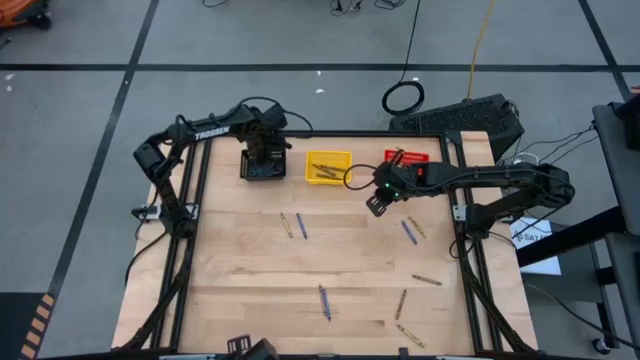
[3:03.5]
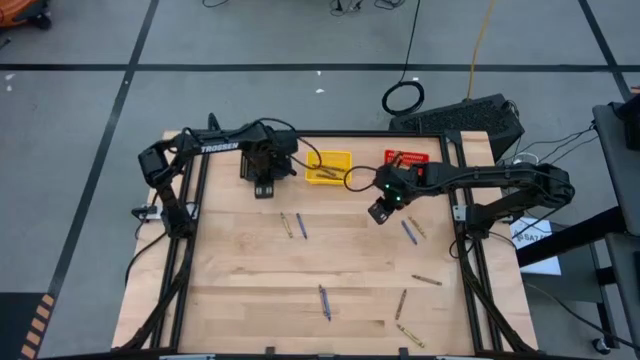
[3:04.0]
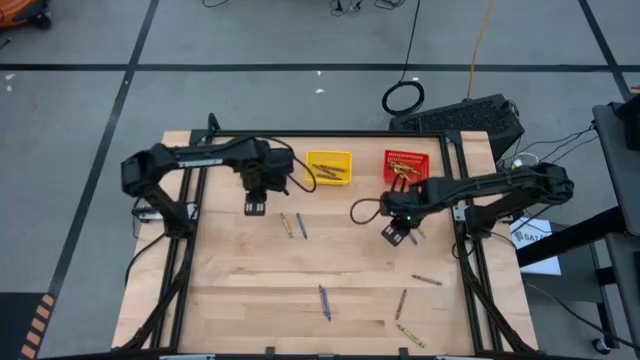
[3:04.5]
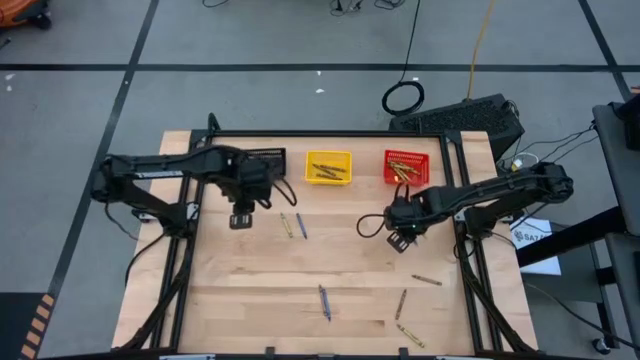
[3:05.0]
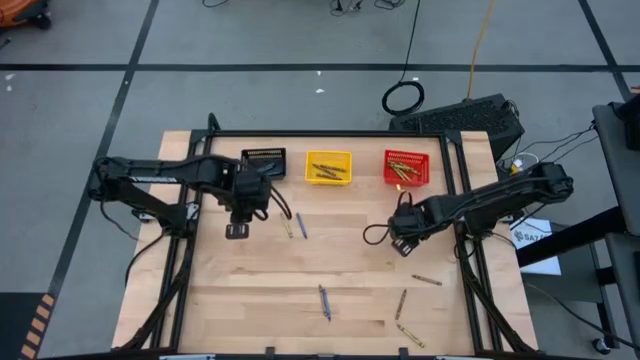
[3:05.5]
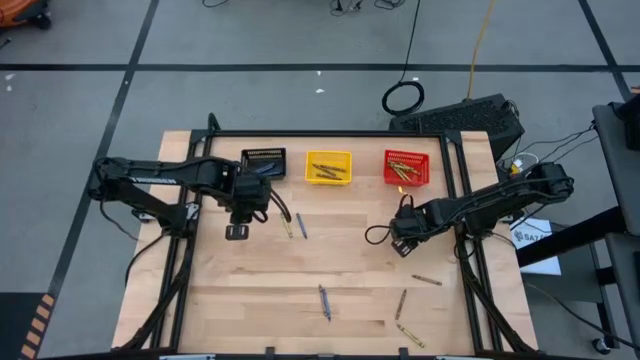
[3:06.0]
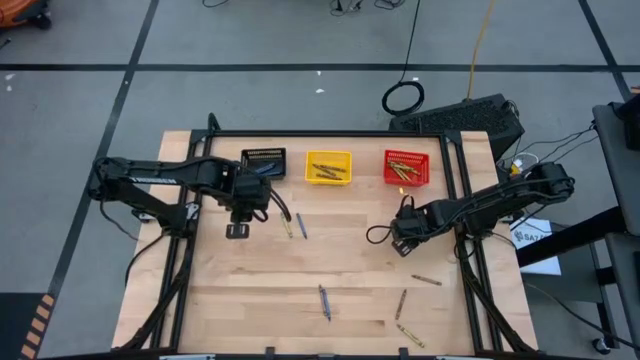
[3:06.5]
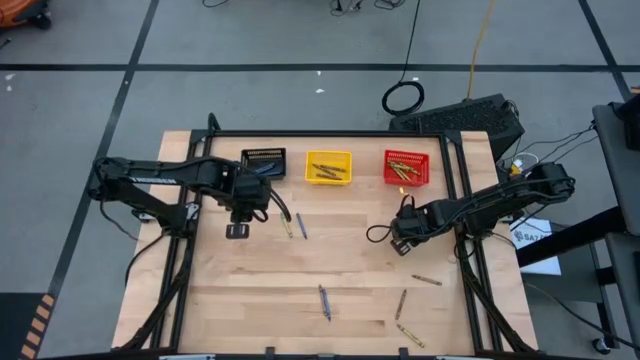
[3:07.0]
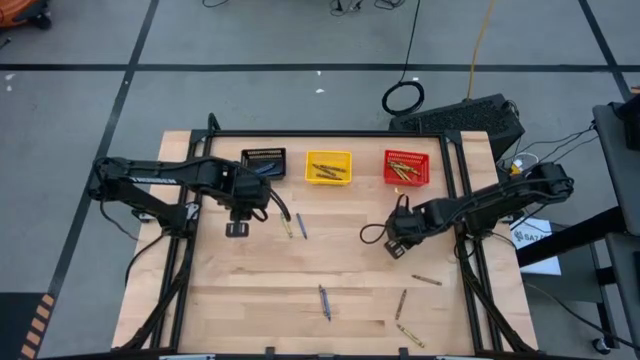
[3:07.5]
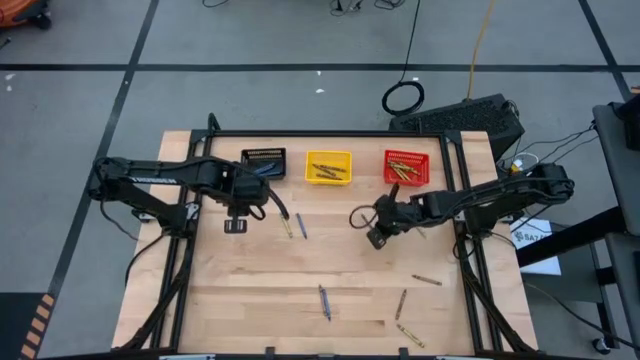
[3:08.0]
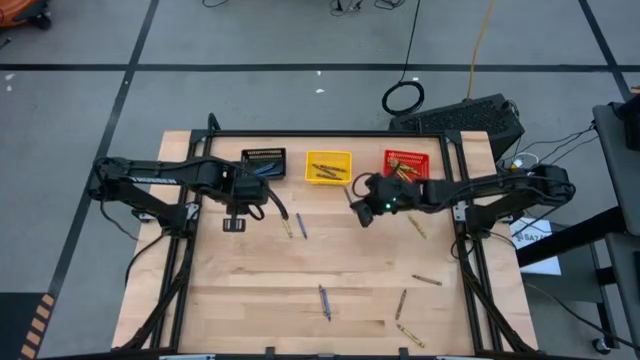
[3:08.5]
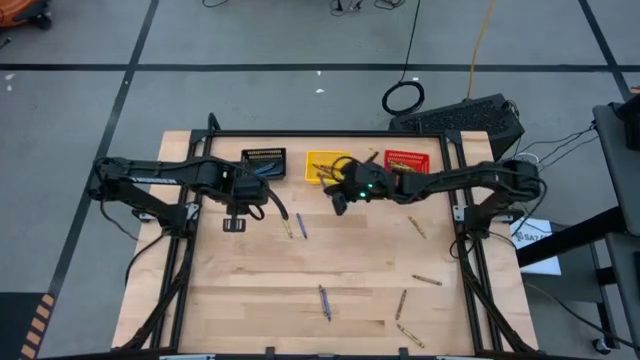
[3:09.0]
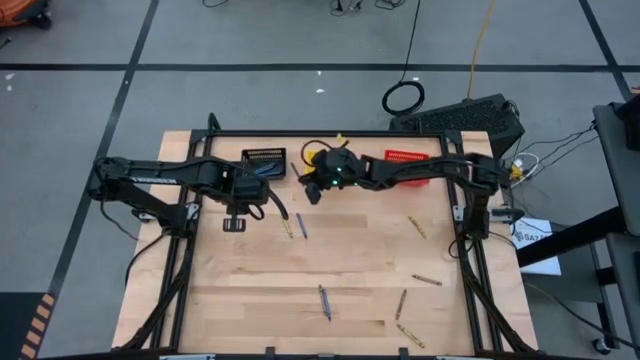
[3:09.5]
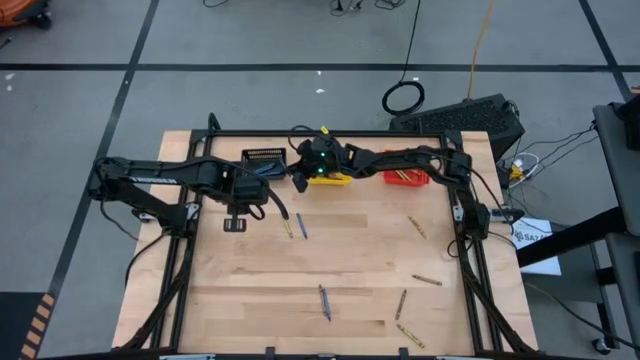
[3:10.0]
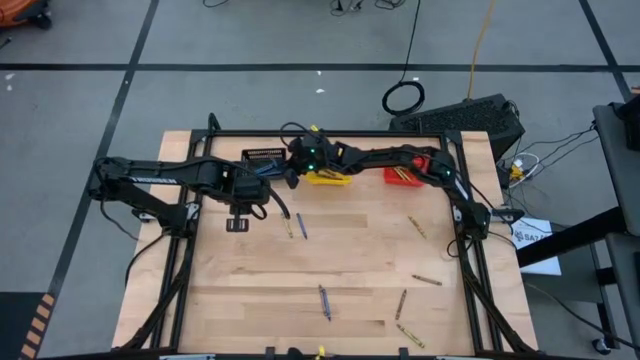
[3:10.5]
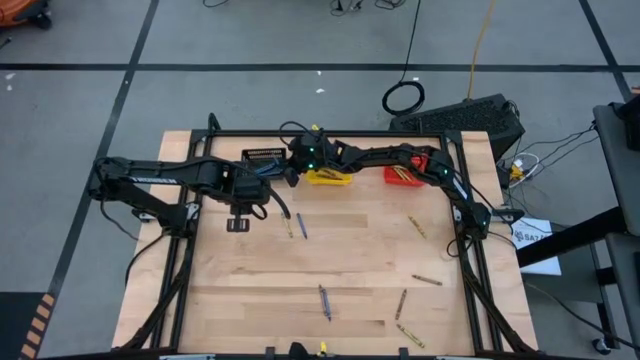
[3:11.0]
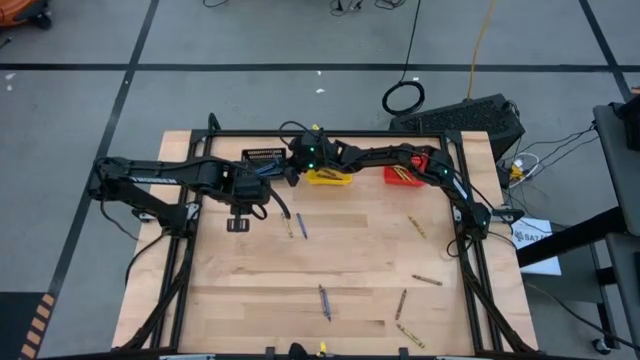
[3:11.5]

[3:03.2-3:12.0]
Task: Sort crayons
Put the blue crayon into the black bin

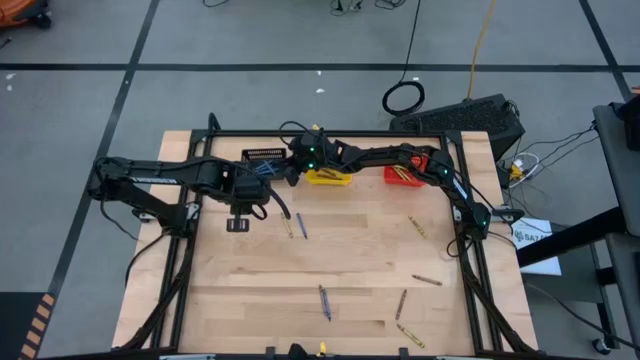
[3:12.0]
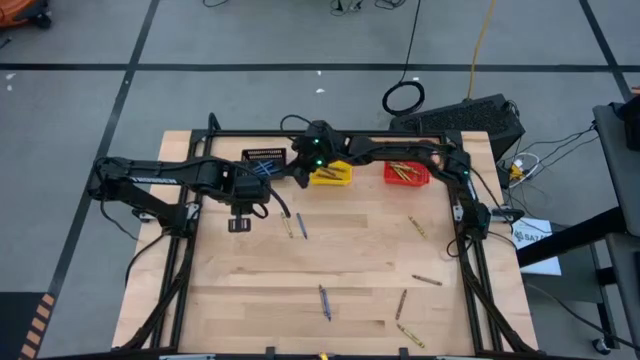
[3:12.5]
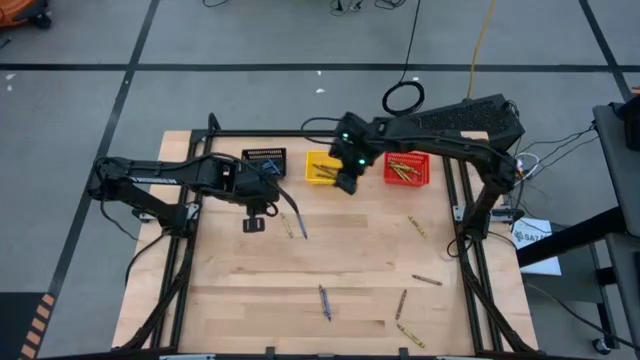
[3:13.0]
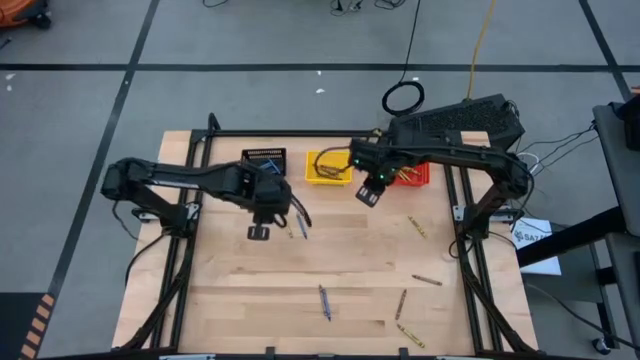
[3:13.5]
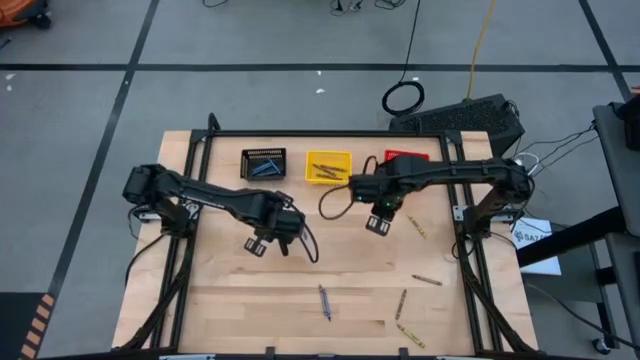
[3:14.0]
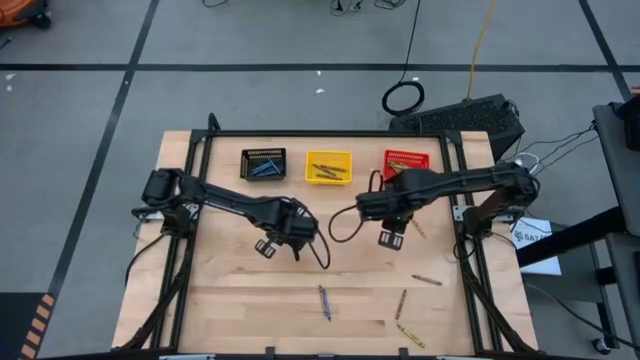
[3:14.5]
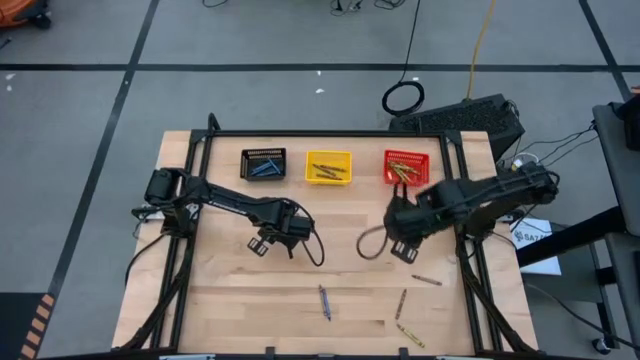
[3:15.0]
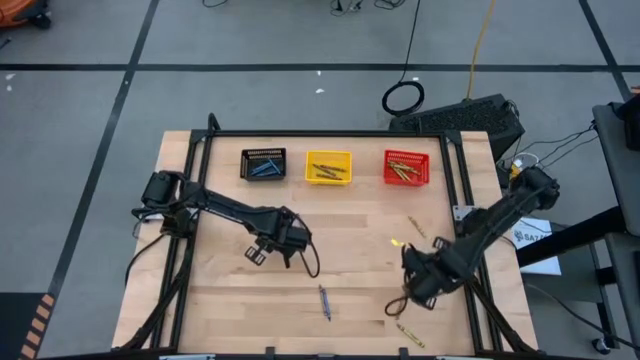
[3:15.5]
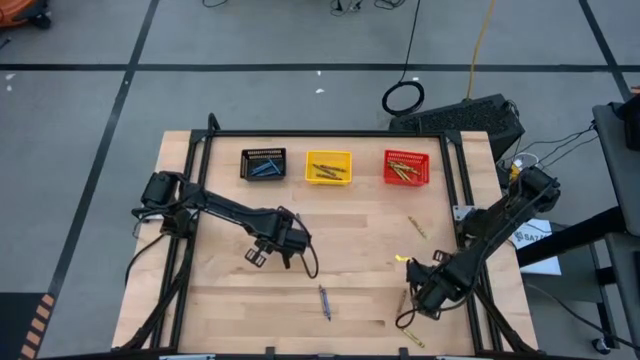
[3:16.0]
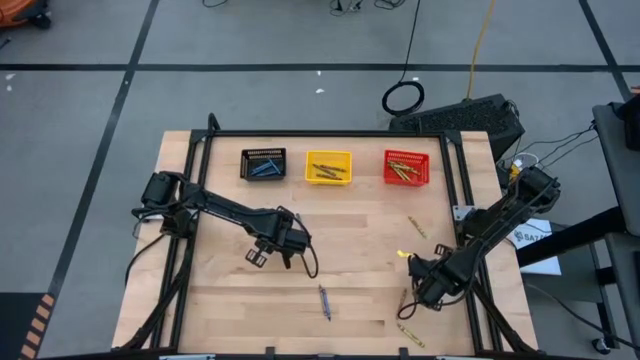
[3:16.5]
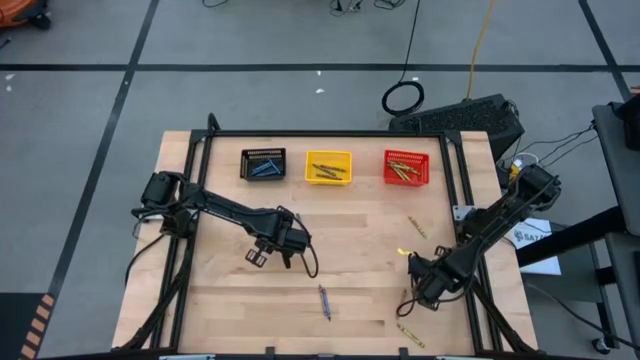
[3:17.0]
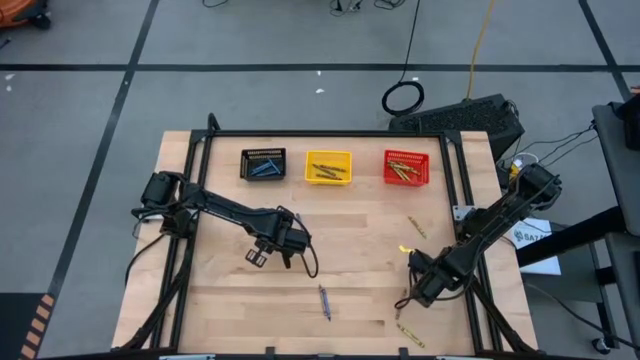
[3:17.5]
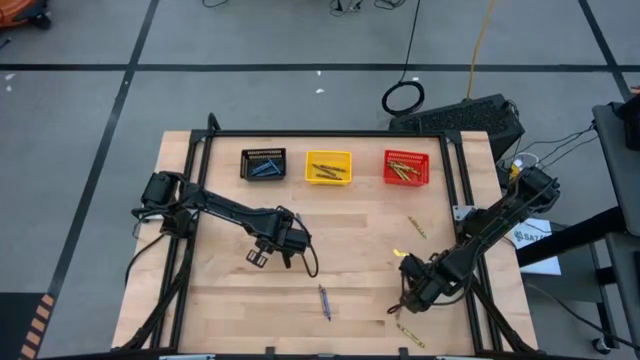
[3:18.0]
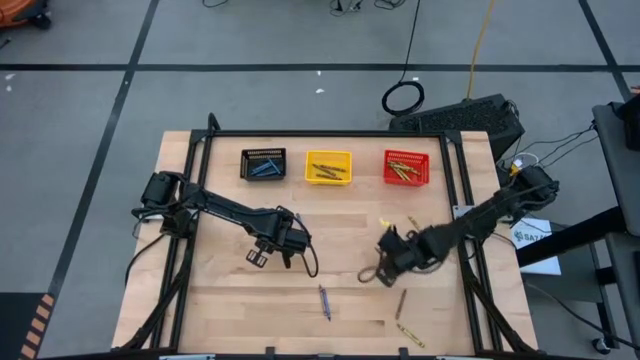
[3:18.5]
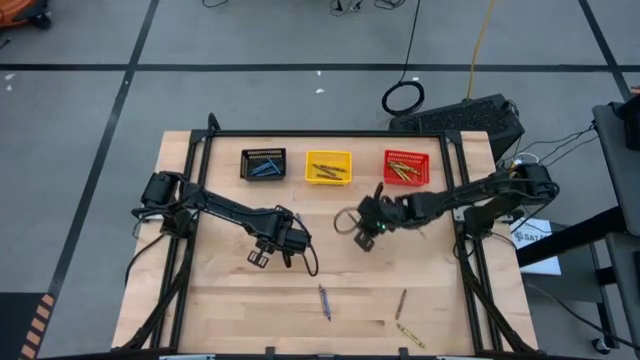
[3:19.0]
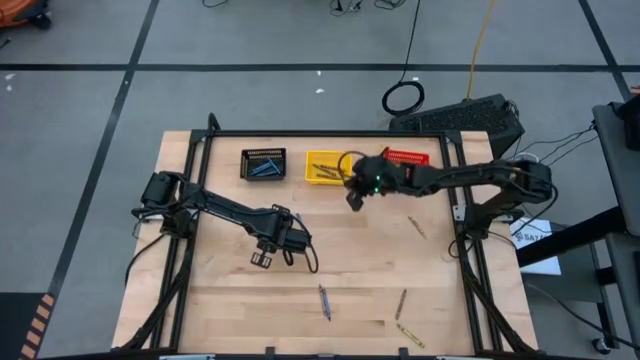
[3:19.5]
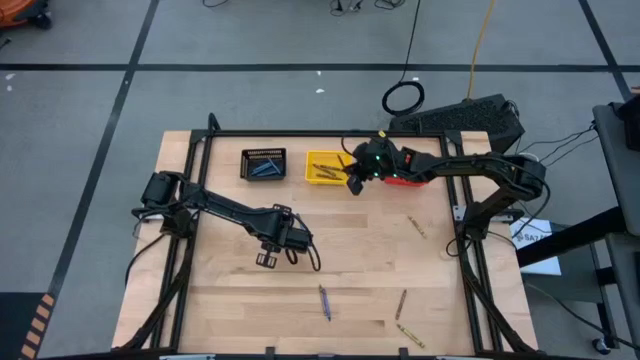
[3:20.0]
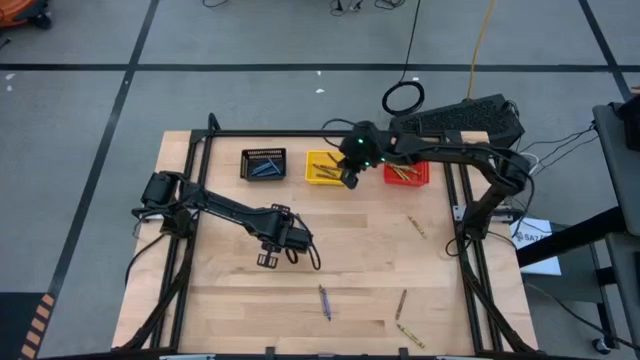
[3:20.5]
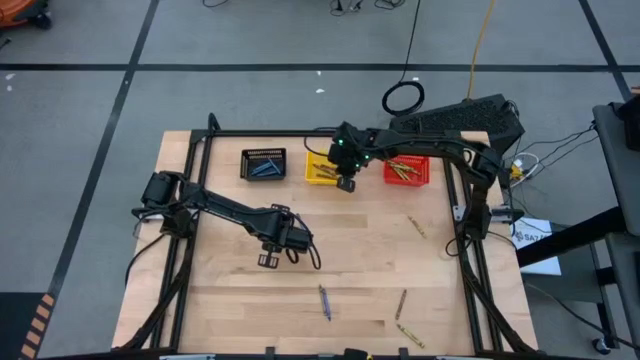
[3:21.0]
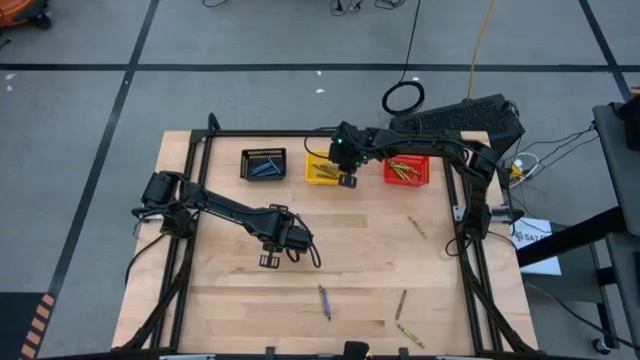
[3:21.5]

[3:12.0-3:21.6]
Put the brown crayon into the yellow bin

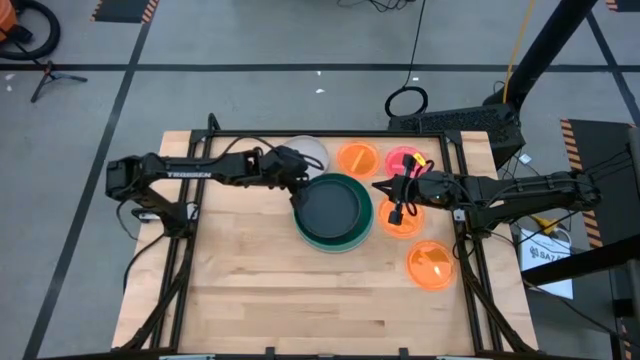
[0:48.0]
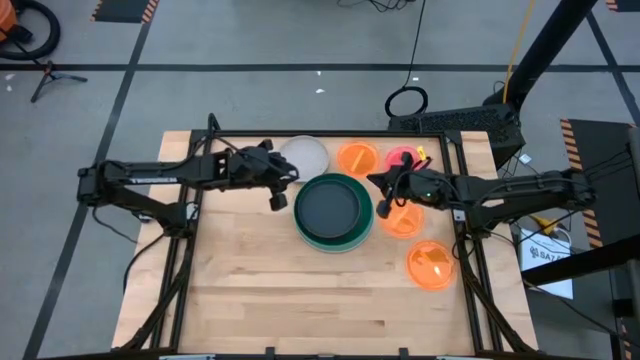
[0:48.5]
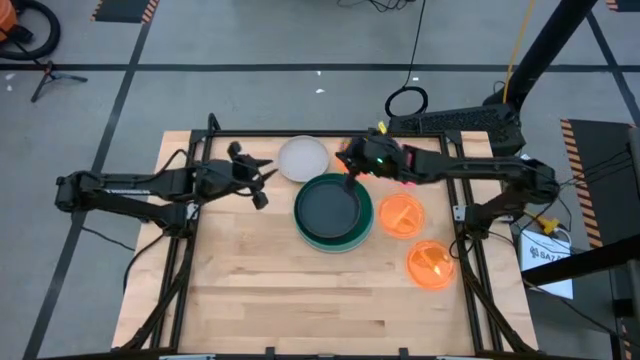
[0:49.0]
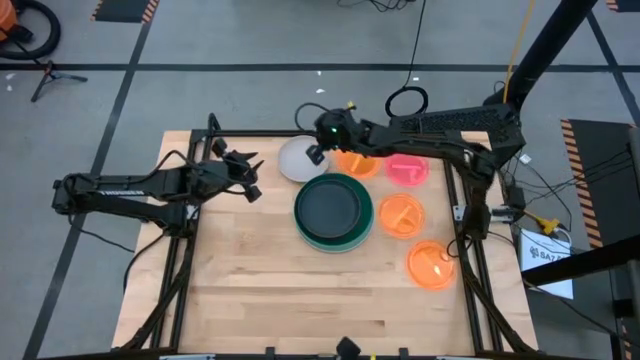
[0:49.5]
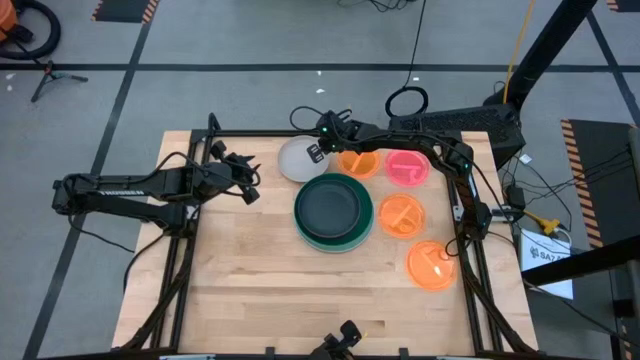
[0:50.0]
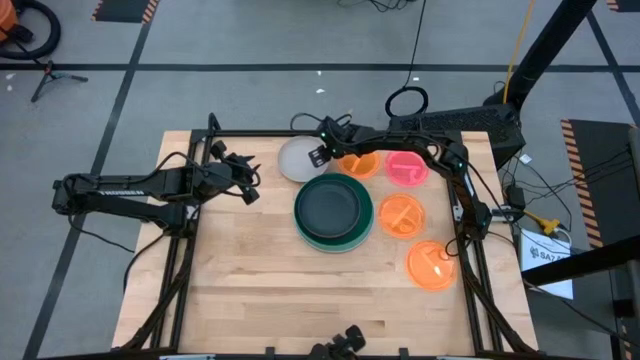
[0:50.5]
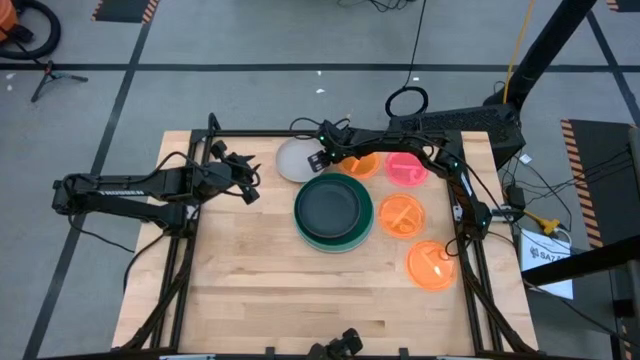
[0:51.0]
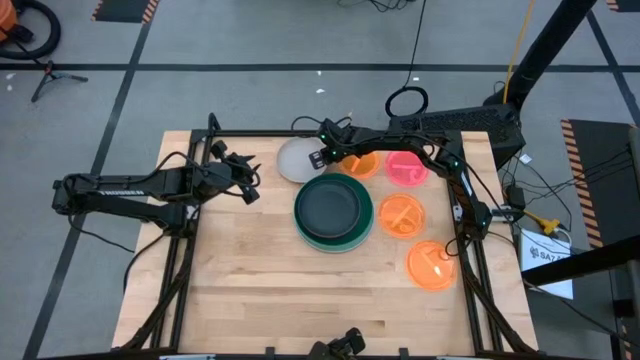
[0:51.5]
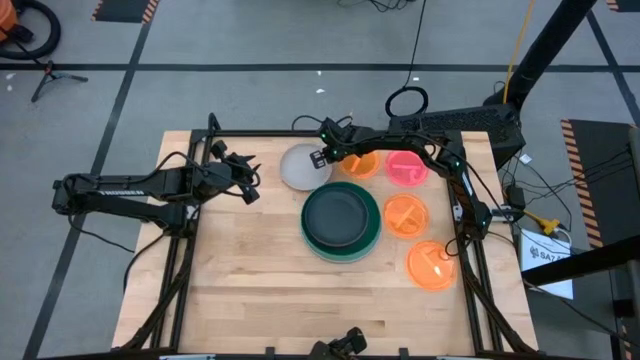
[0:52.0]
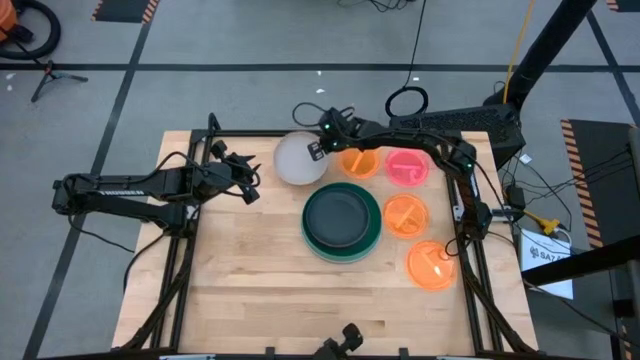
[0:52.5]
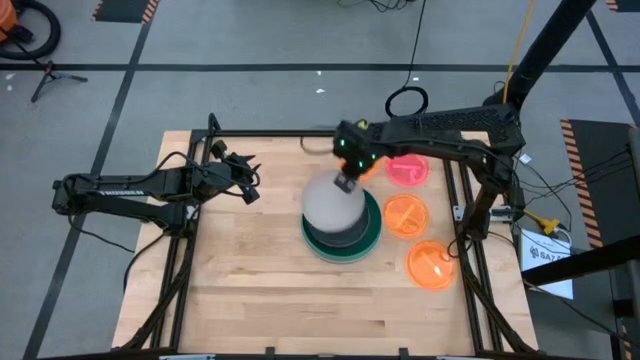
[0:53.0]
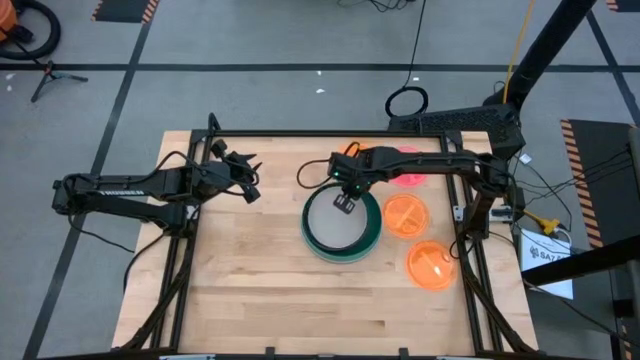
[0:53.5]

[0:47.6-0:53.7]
Task: Stack plastic plates
Stack the gray plate on top of the black plate
